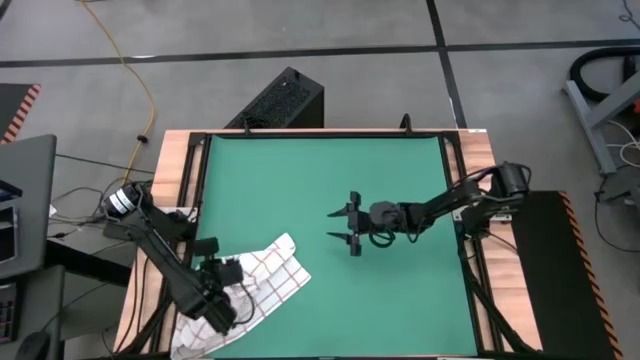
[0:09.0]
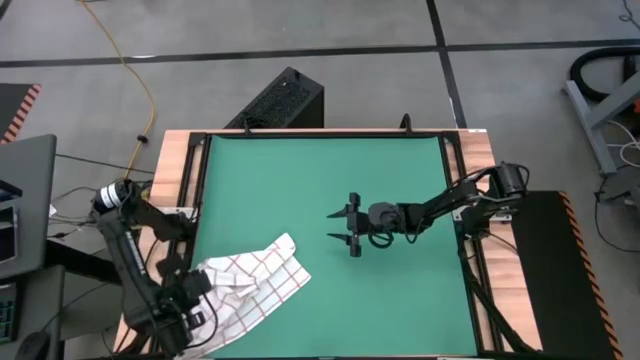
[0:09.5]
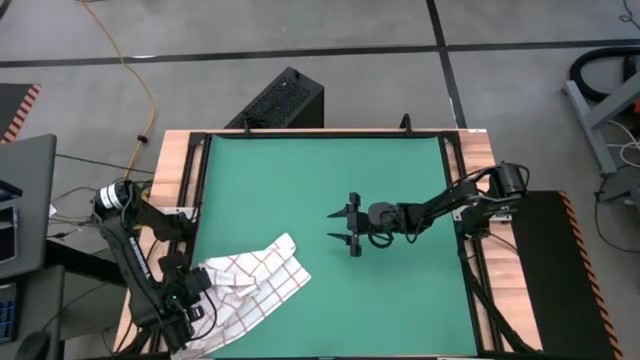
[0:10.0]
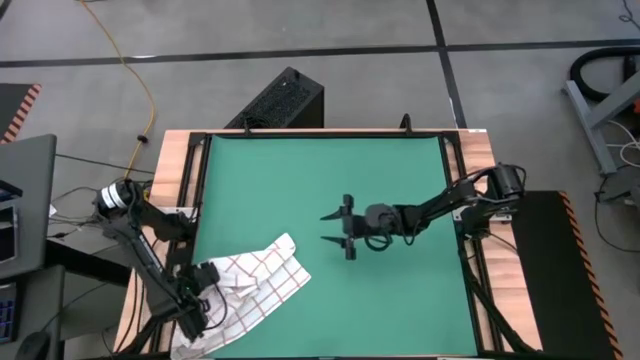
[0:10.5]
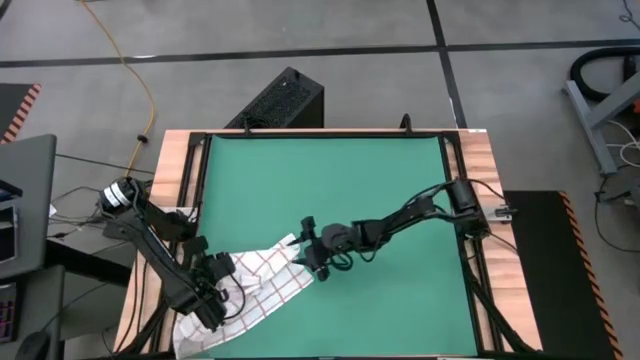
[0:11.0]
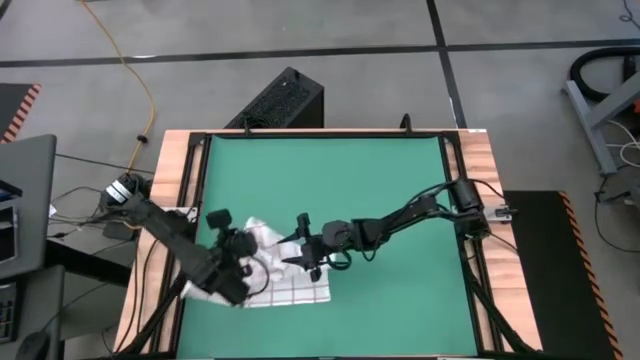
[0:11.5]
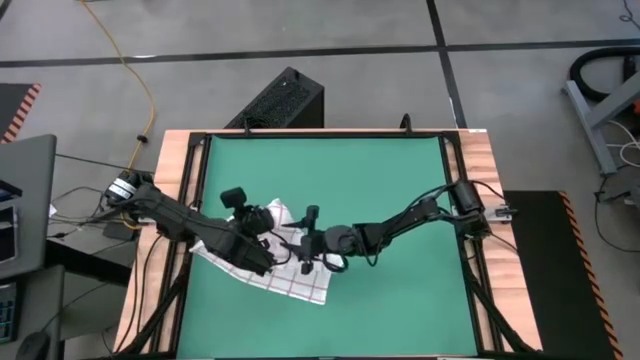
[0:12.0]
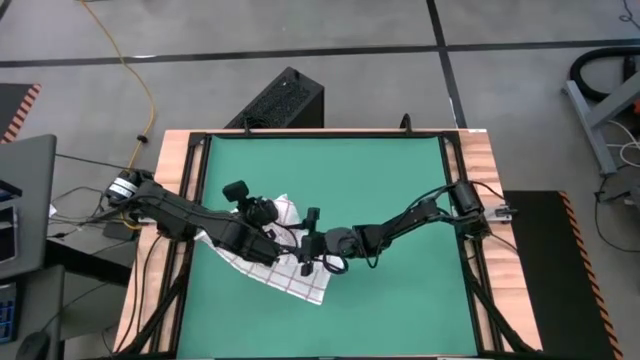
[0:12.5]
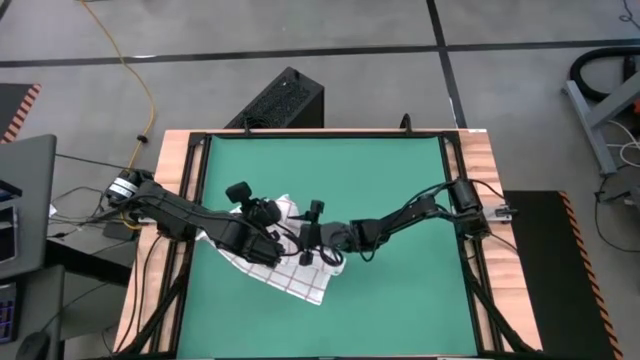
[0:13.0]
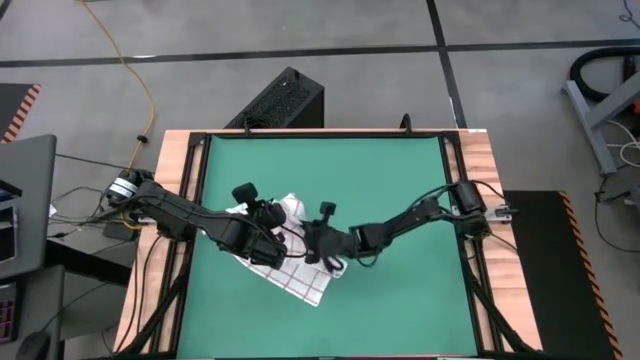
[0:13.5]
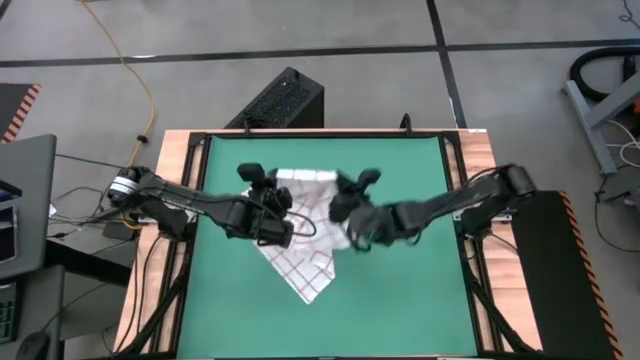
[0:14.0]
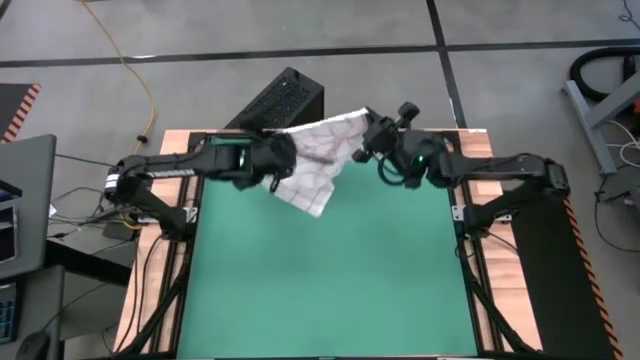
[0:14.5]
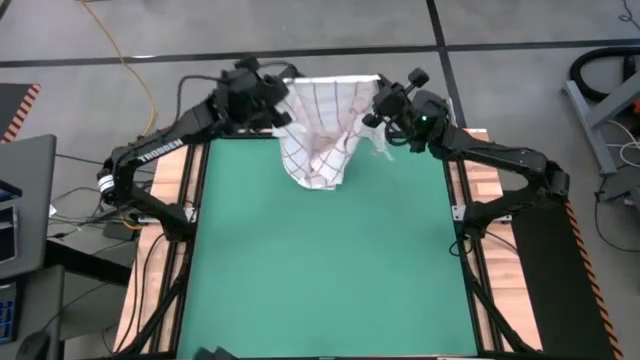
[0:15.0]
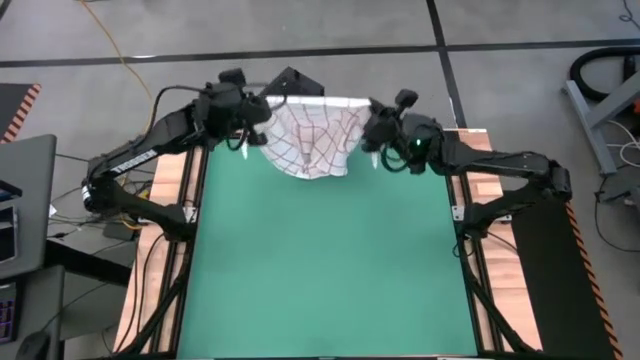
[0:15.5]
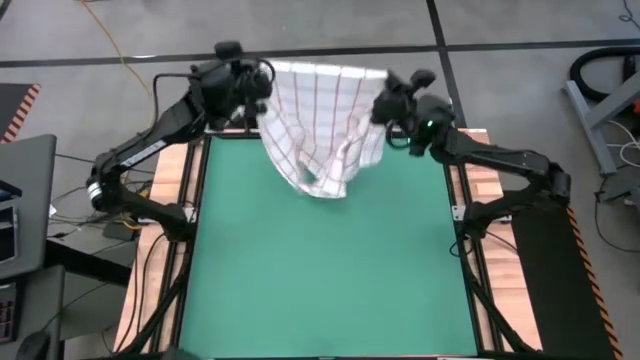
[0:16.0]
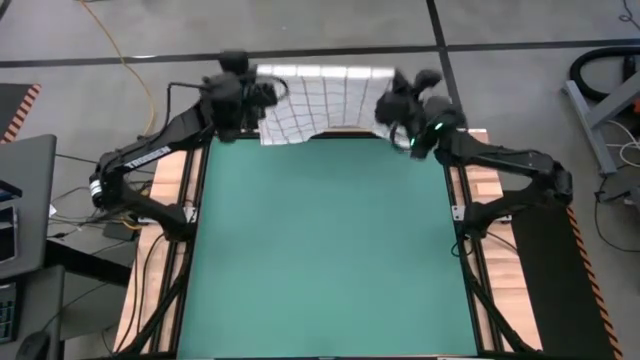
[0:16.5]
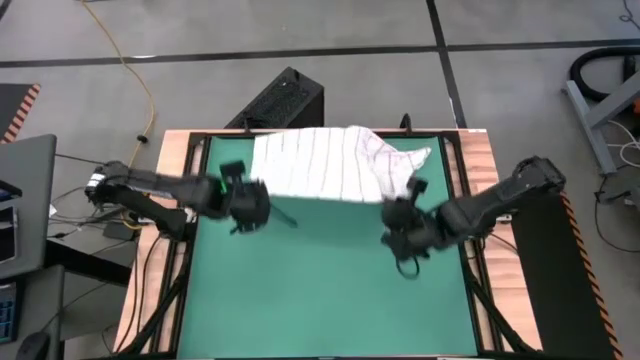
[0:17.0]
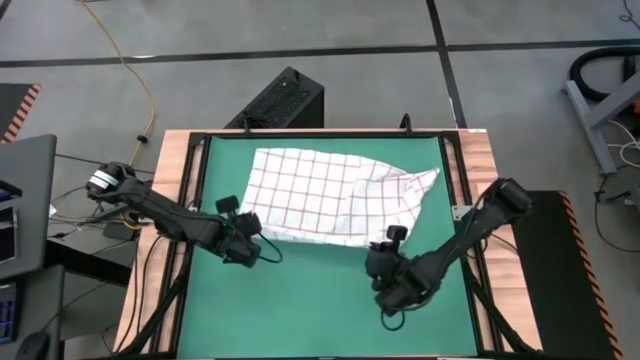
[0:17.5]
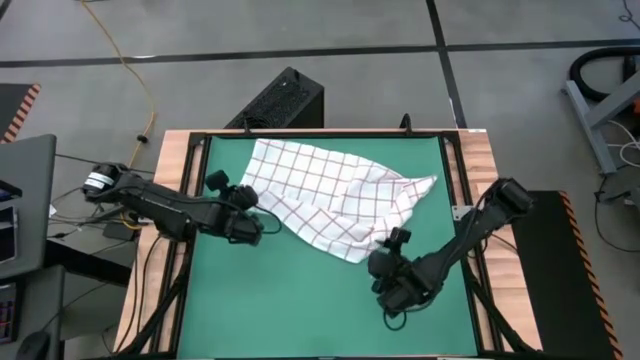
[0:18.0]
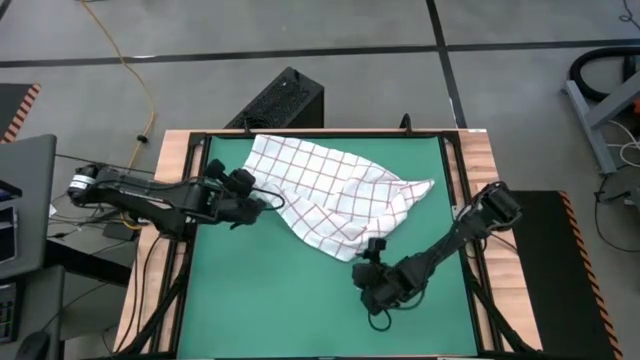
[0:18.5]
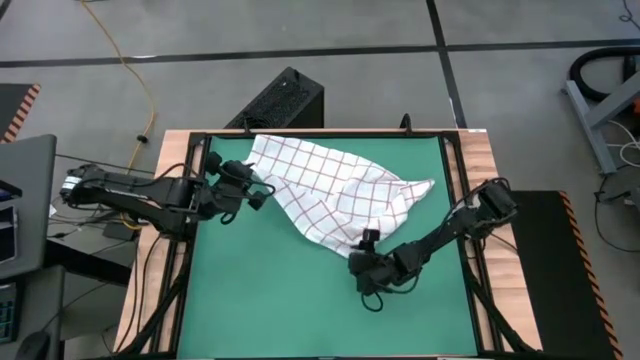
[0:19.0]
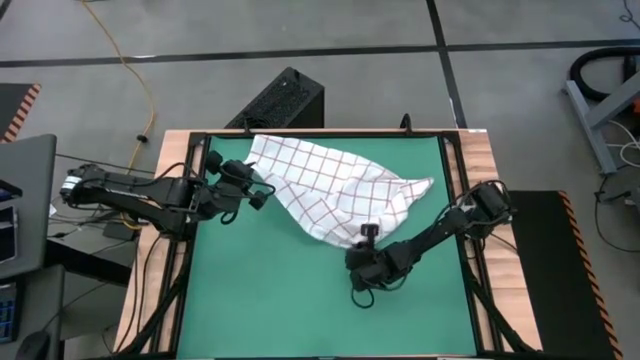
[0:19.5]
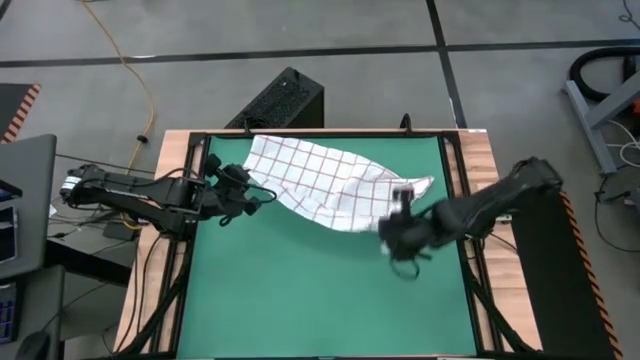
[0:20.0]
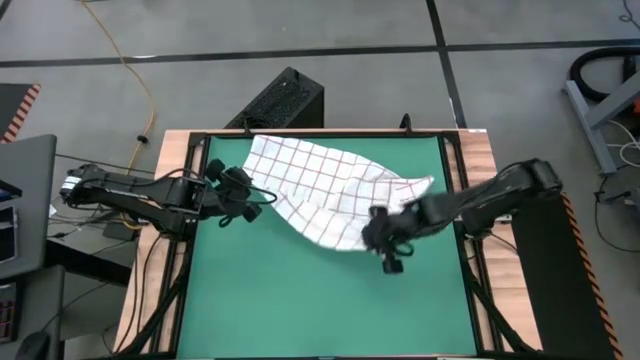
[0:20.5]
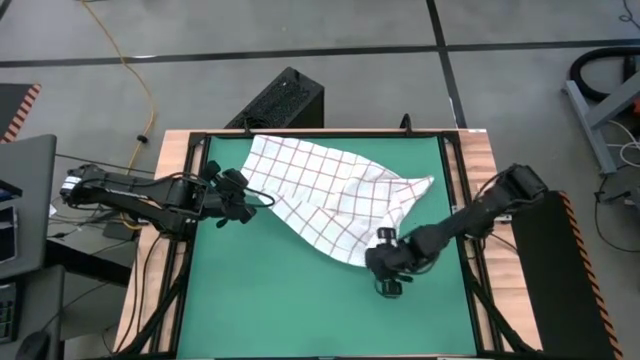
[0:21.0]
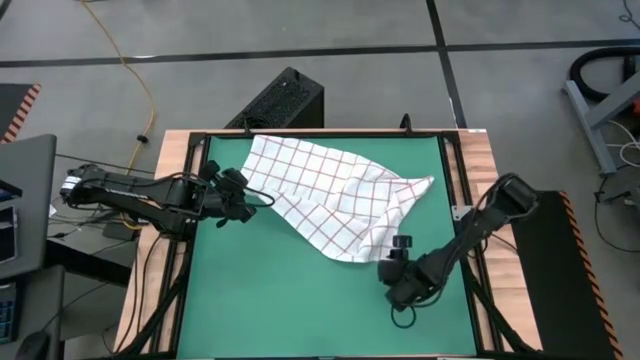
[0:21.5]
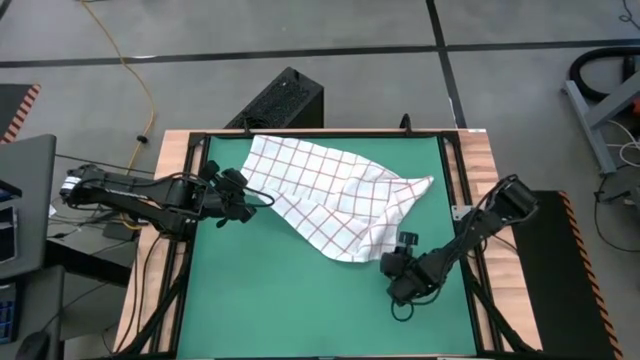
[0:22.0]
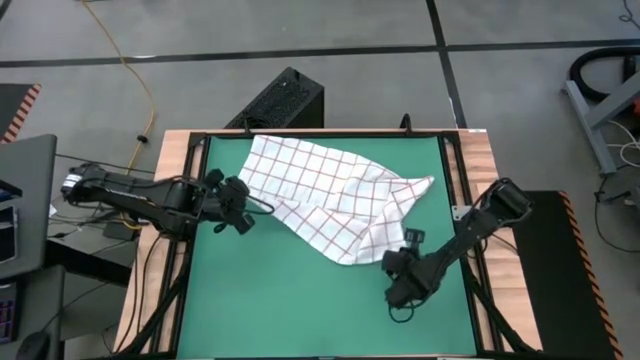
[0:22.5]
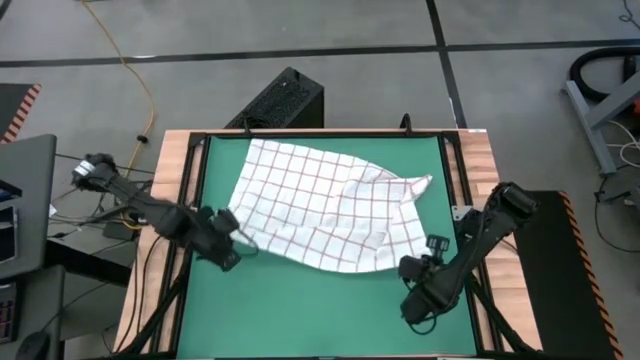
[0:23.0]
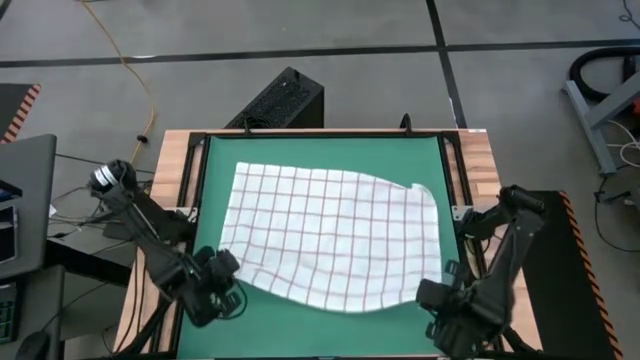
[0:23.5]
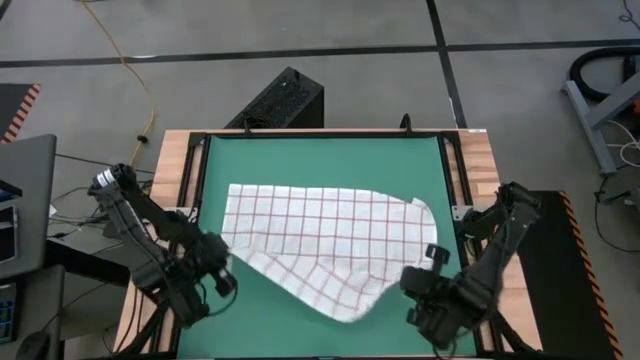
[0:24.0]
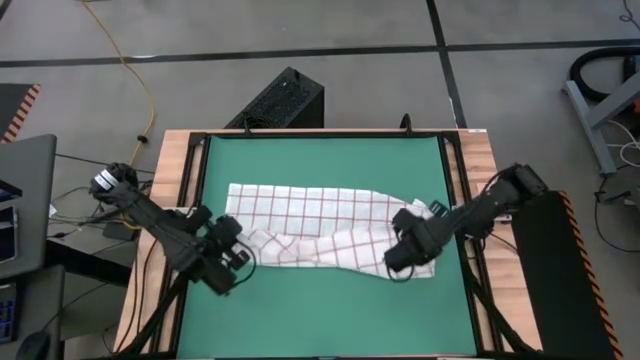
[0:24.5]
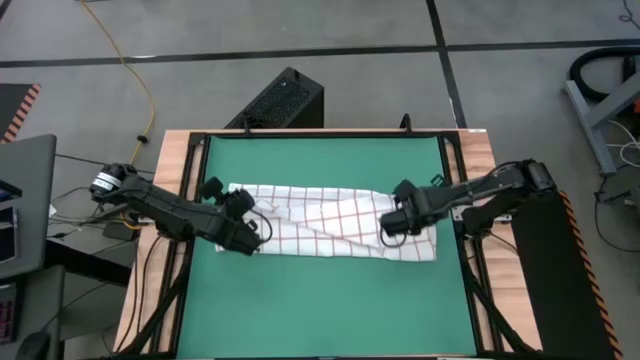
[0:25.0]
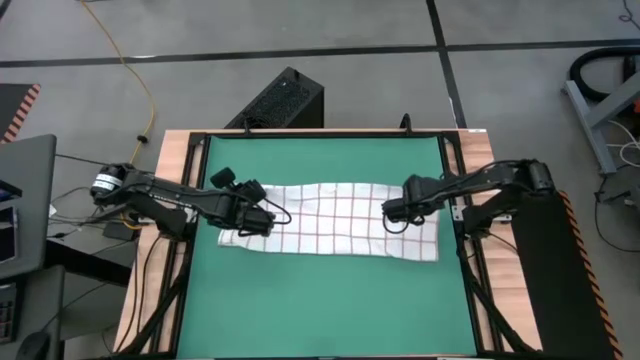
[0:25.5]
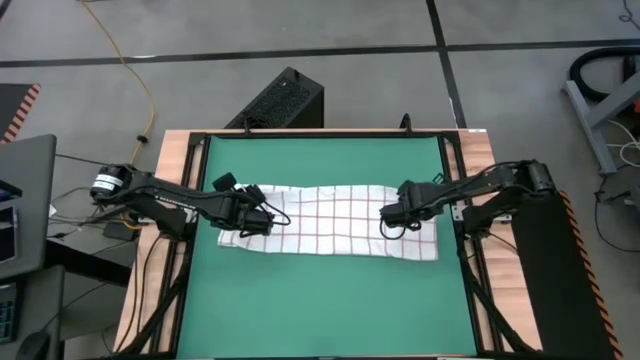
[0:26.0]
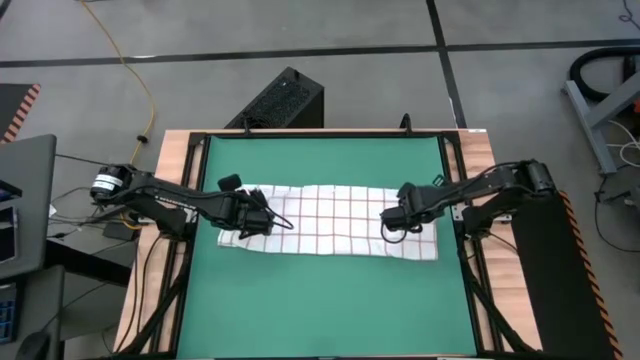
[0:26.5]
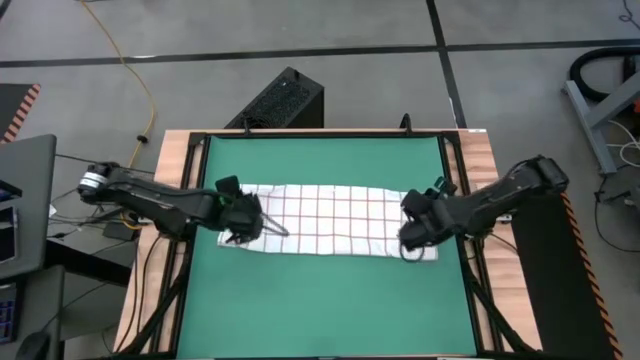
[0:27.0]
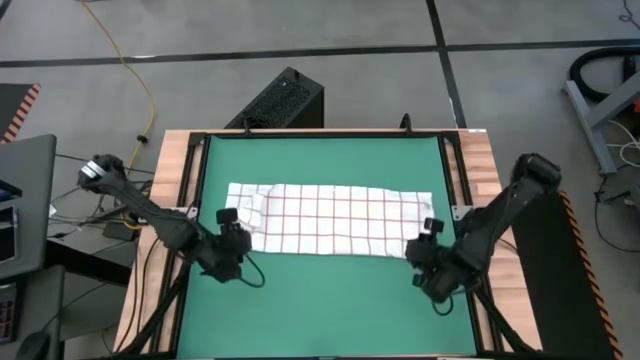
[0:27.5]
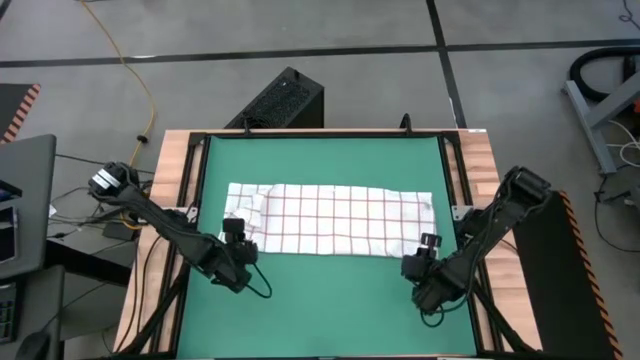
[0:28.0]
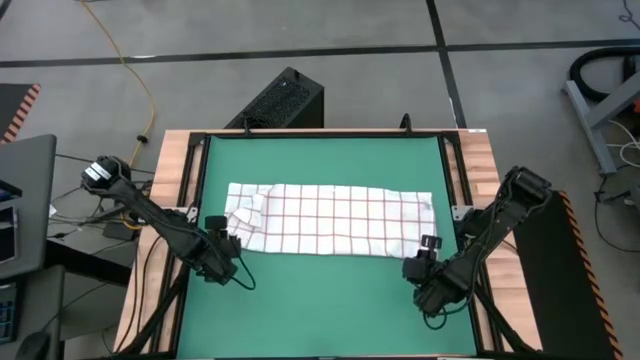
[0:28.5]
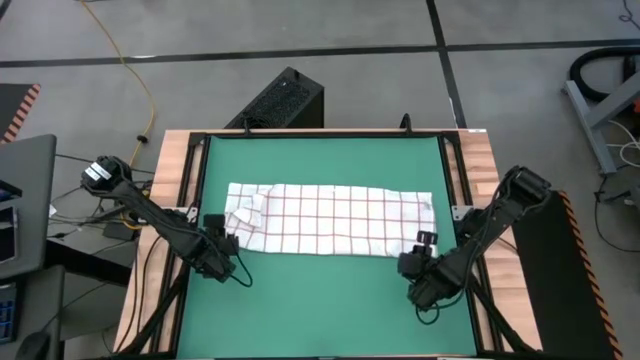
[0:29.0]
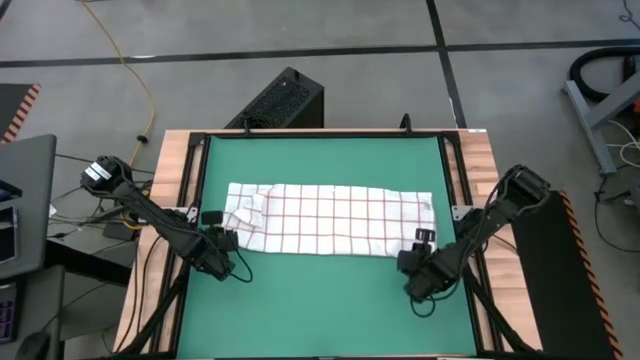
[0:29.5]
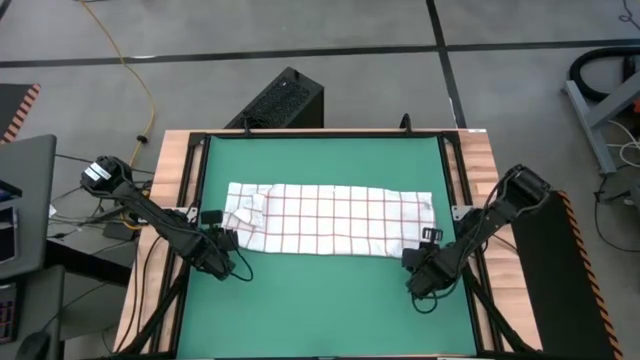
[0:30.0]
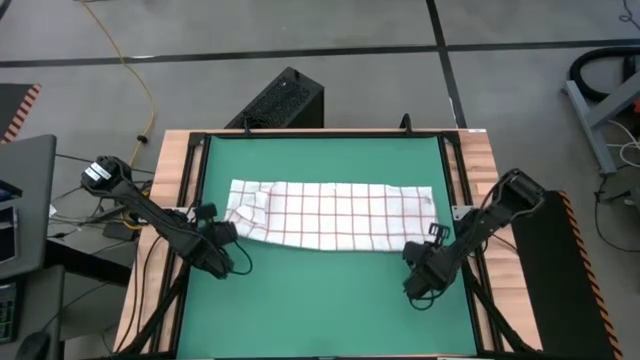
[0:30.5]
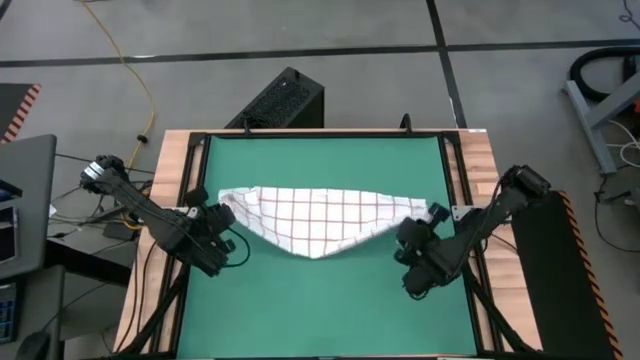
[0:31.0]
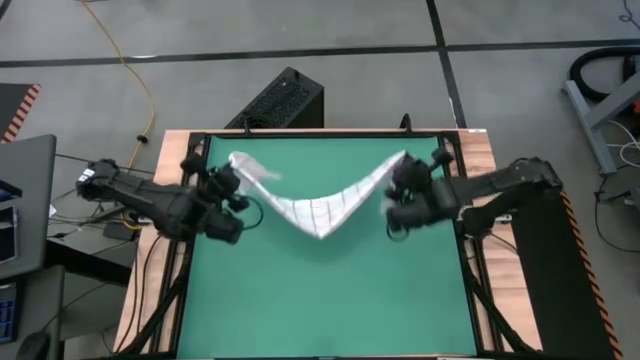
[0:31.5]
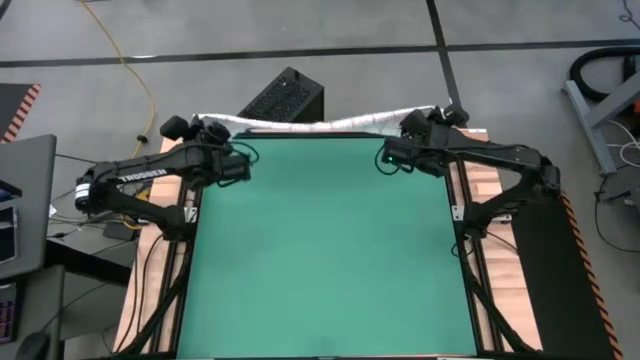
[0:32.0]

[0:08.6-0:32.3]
Task: Roll towel
Roll the white towel
